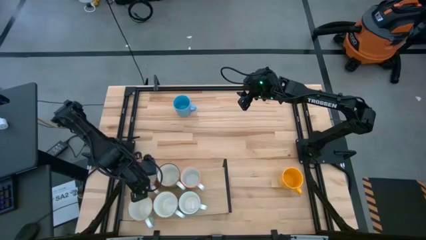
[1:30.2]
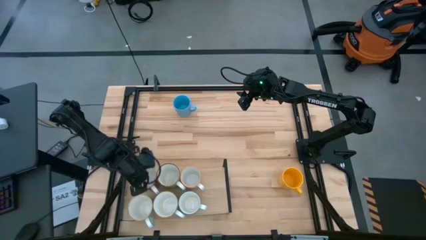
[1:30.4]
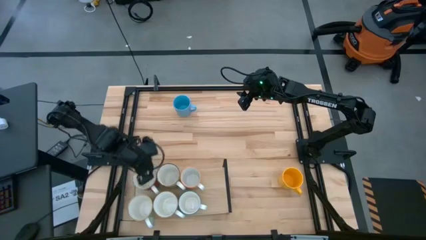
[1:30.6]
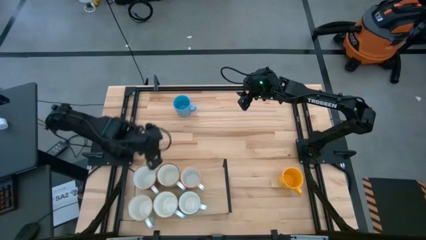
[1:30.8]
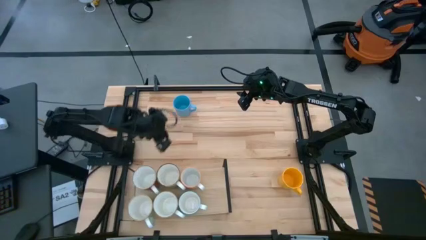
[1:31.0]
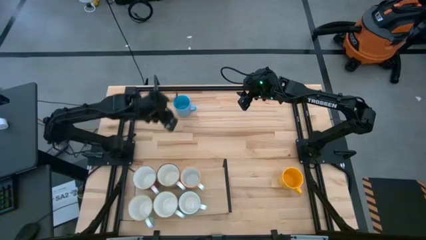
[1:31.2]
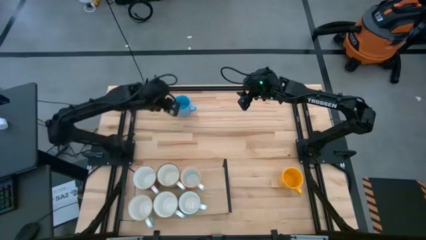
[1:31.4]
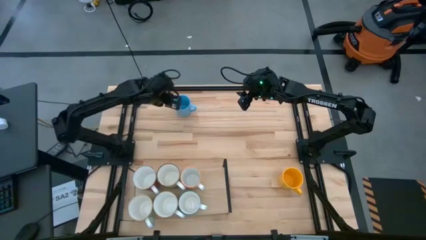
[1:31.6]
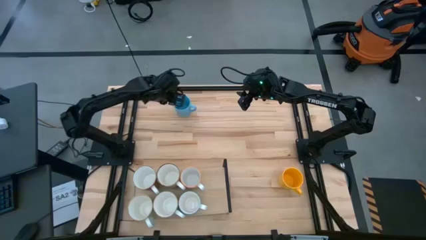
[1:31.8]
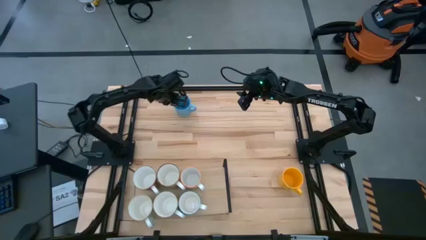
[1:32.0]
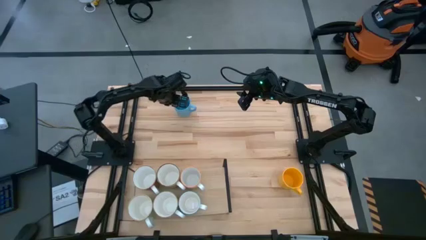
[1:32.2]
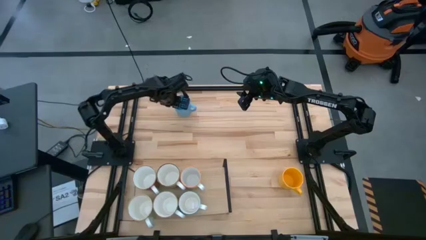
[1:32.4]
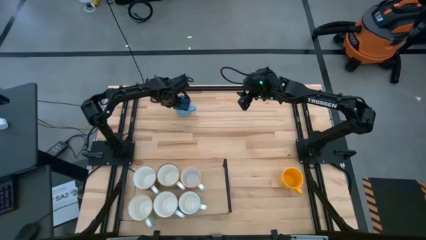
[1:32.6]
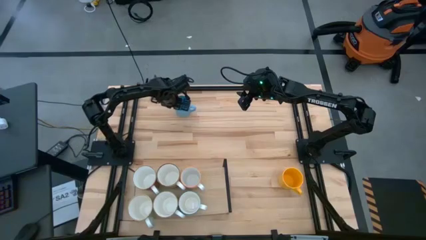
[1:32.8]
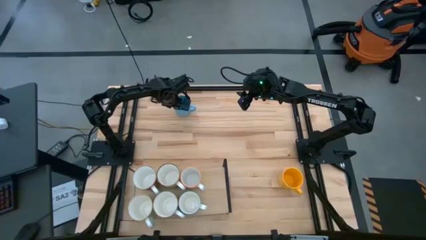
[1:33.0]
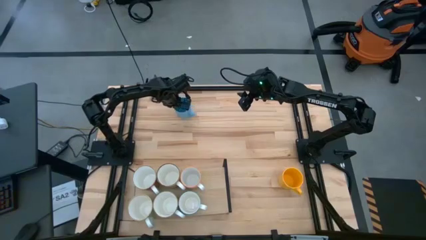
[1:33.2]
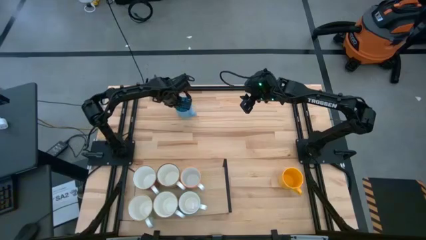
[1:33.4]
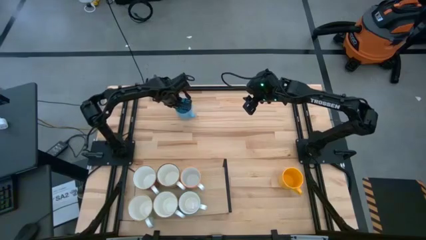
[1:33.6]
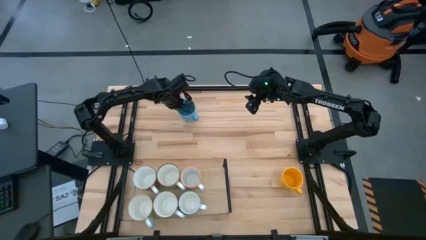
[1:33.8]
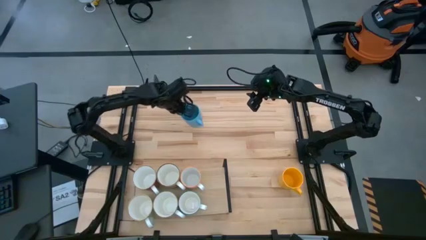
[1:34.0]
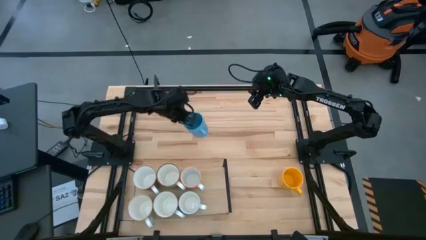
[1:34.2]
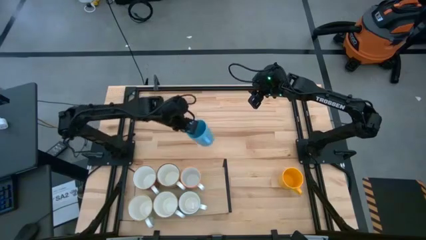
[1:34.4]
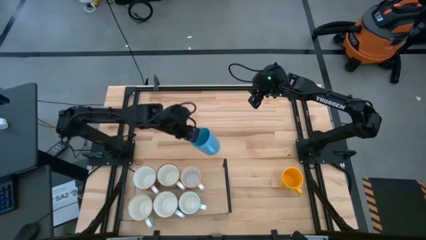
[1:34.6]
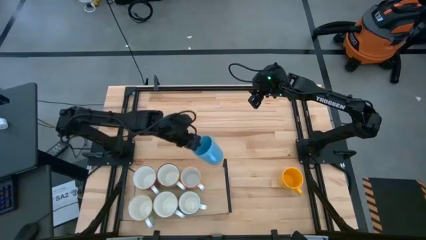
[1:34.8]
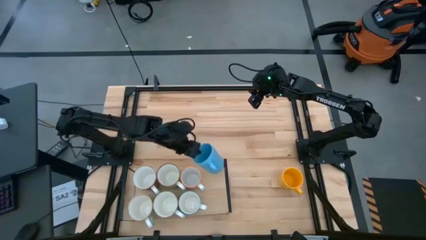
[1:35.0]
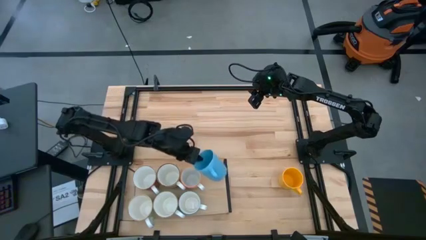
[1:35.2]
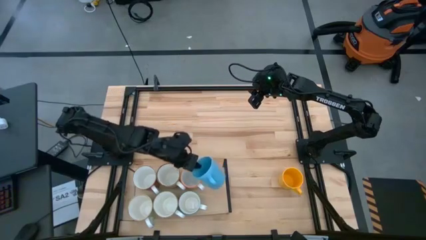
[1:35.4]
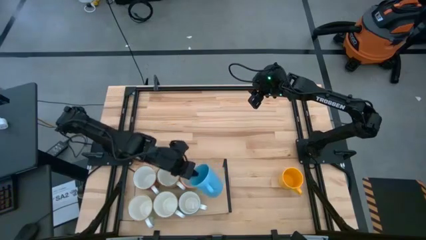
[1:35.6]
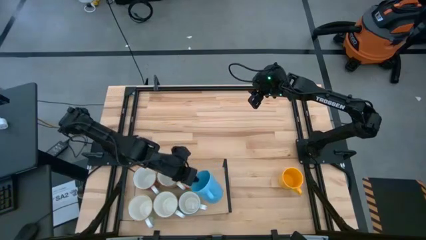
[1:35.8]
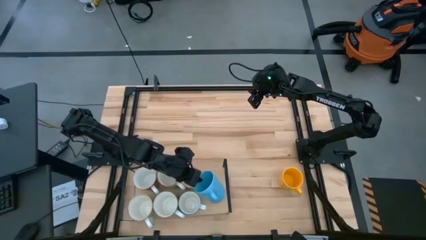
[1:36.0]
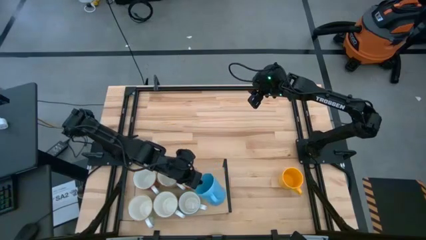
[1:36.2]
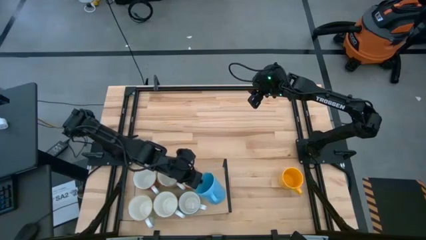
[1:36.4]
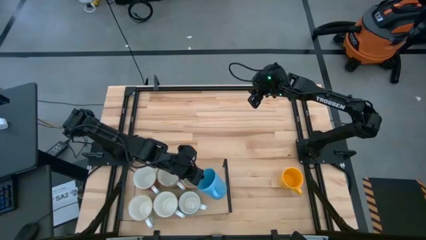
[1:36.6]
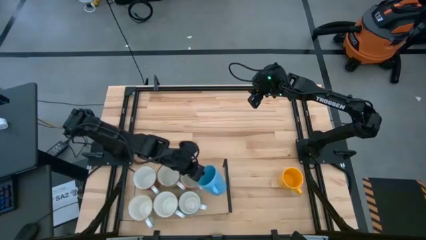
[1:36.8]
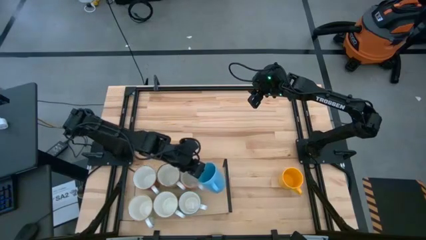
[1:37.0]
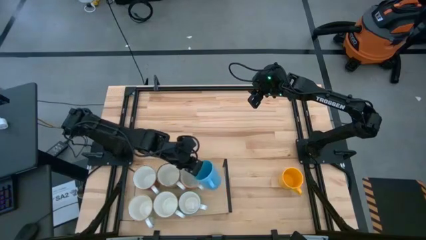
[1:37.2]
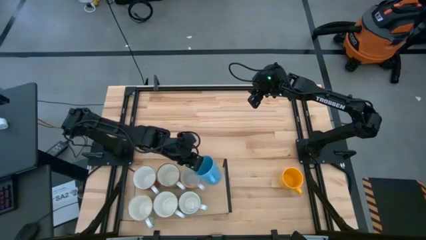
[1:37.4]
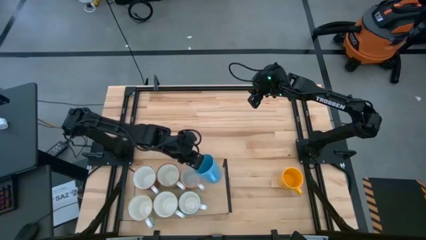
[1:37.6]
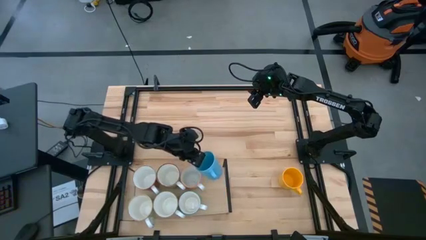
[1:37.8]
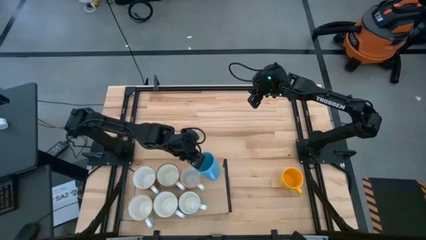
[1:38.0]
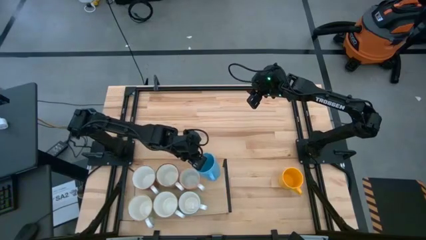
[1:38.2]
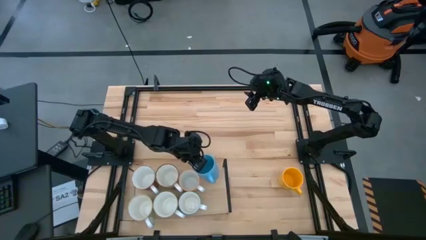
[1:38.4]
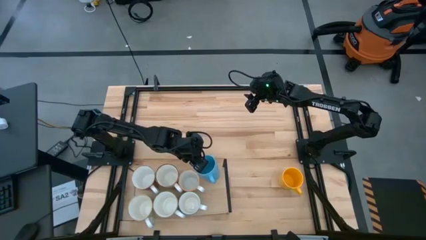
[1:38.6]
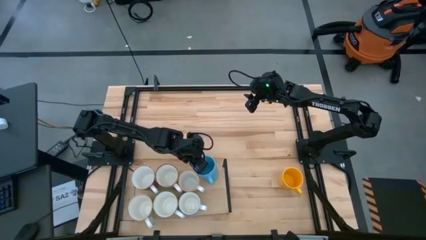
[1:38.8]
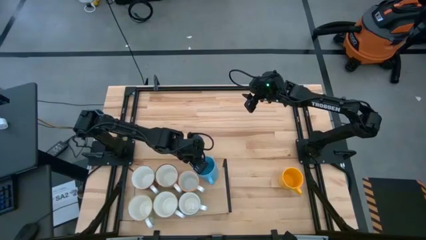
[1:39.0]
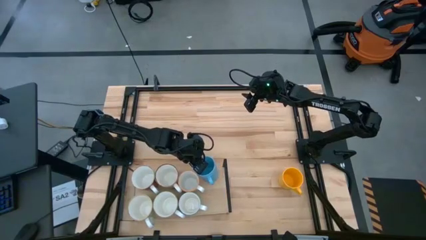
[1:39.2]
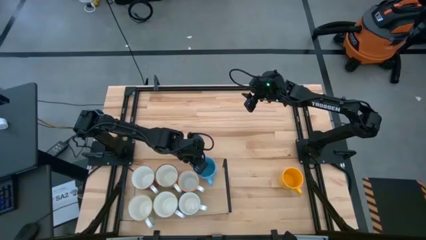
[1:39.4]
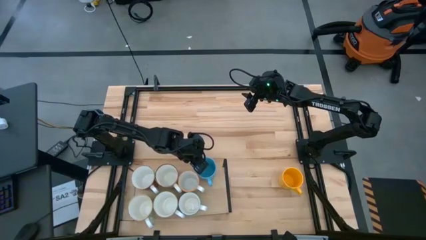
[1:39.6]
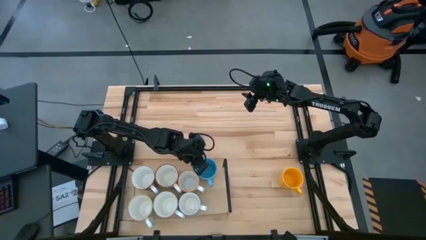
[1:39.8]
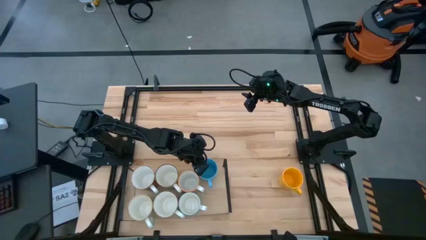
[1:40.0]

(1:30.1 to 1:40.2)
Task: Place coffee mugs
Put the blue mug on the shelf
